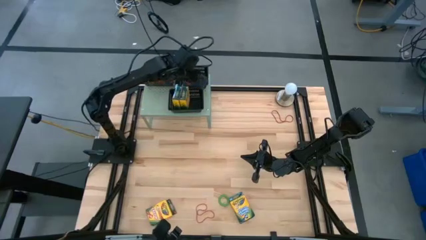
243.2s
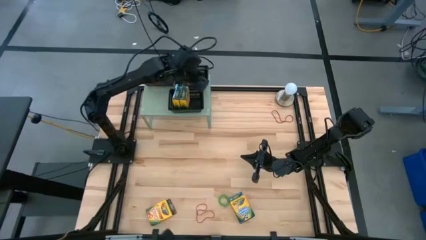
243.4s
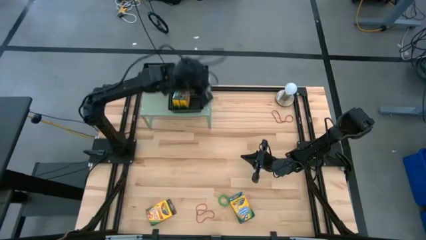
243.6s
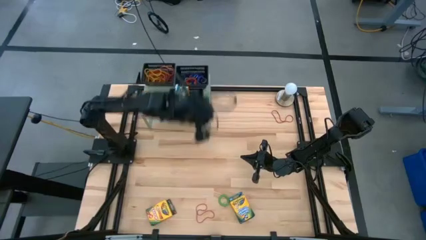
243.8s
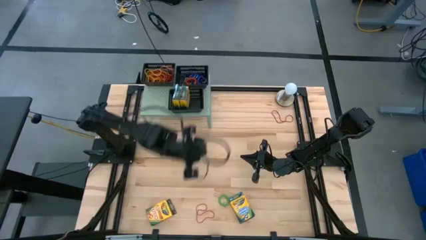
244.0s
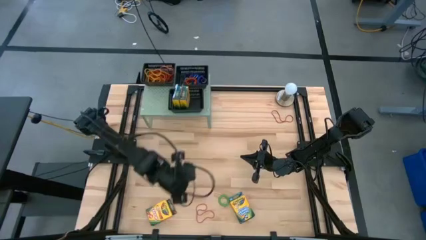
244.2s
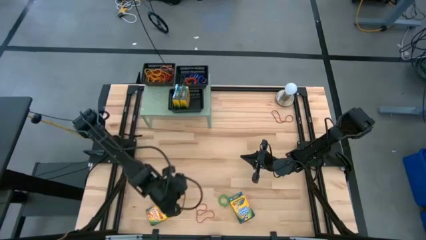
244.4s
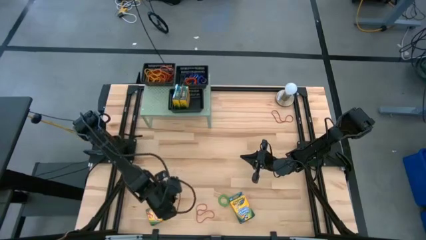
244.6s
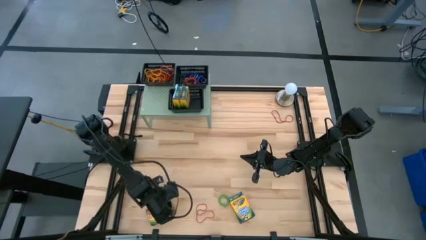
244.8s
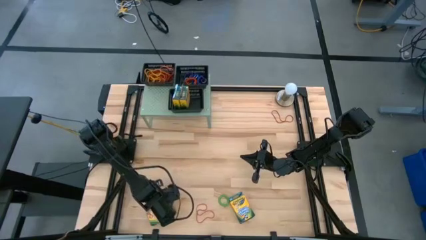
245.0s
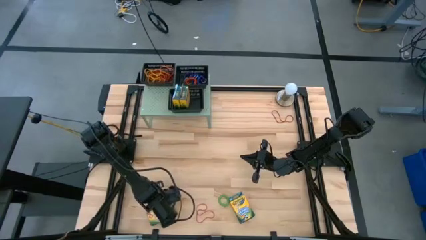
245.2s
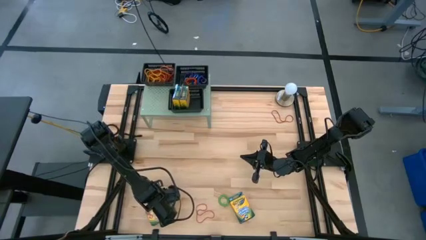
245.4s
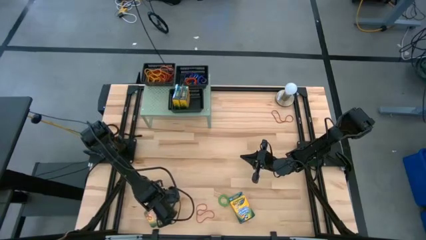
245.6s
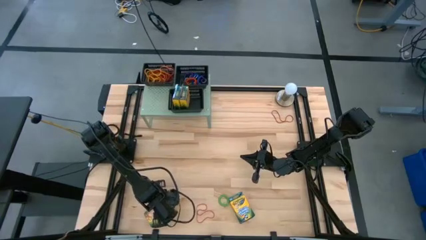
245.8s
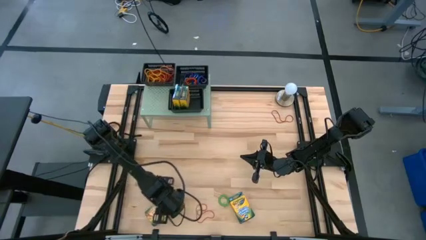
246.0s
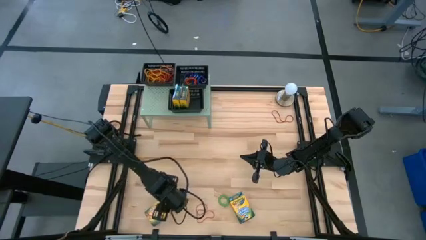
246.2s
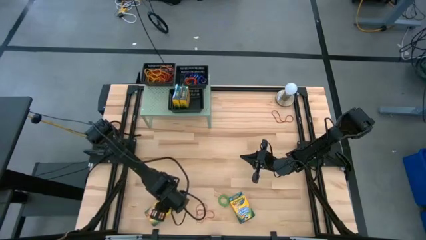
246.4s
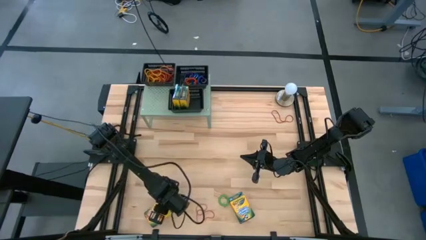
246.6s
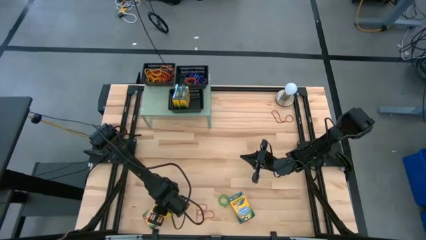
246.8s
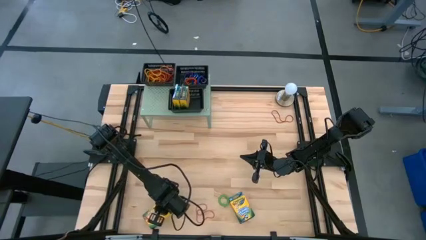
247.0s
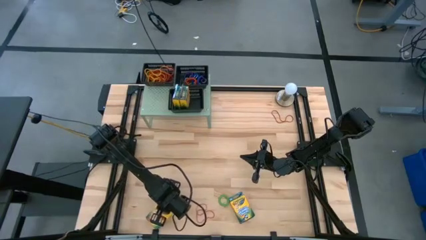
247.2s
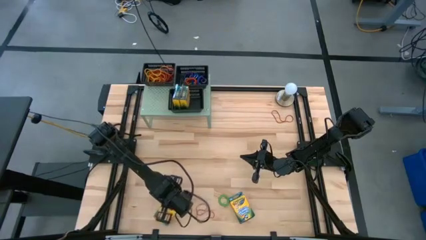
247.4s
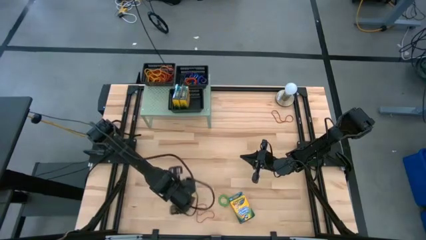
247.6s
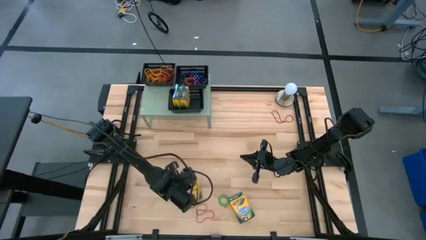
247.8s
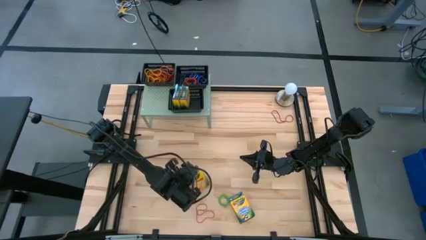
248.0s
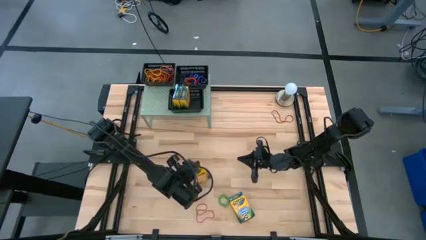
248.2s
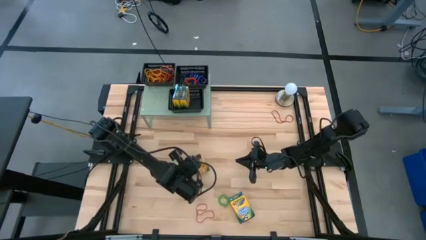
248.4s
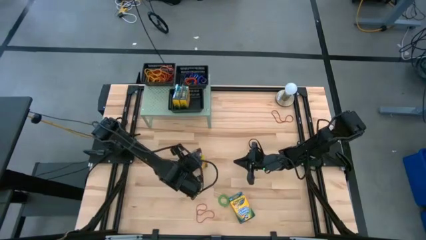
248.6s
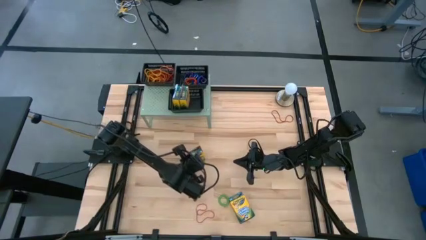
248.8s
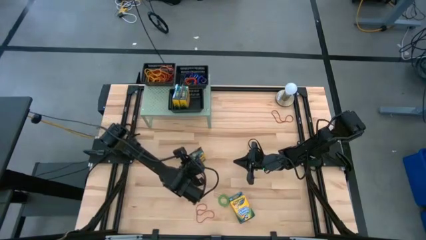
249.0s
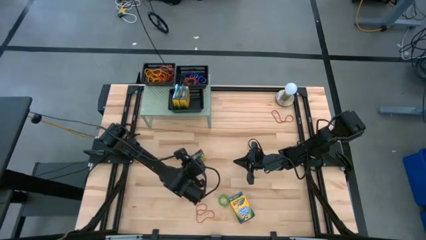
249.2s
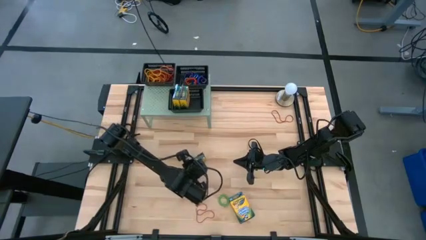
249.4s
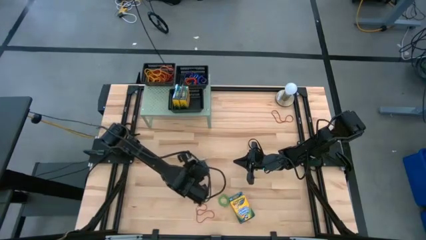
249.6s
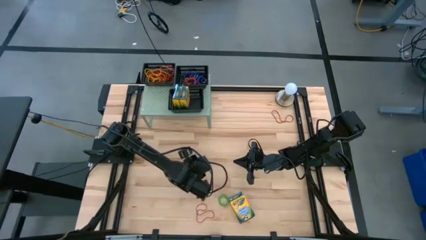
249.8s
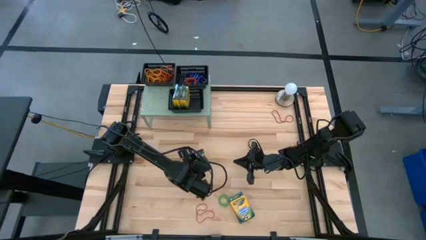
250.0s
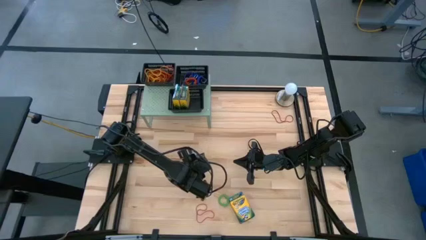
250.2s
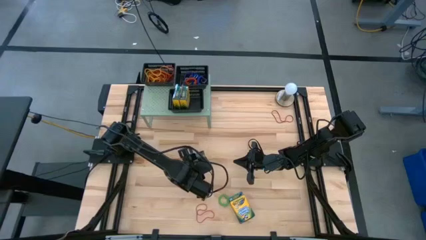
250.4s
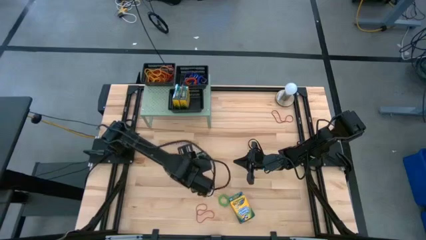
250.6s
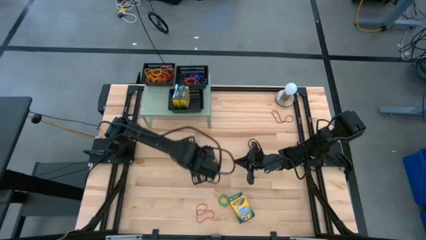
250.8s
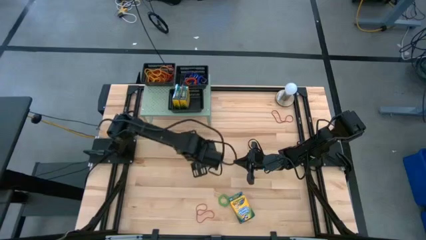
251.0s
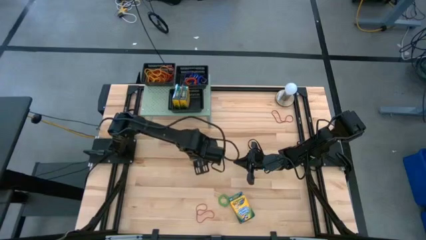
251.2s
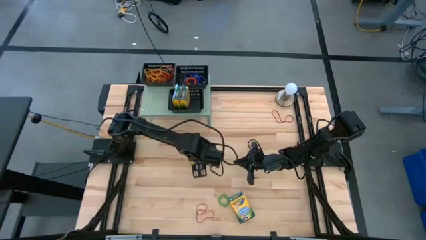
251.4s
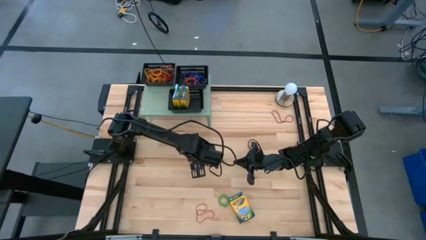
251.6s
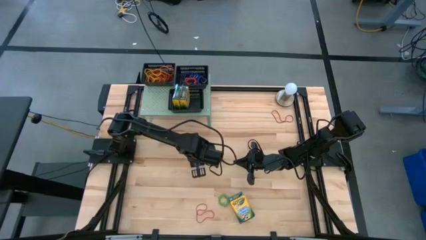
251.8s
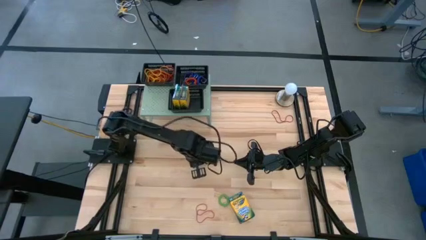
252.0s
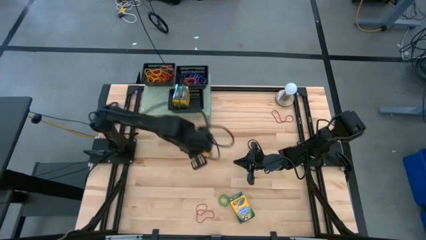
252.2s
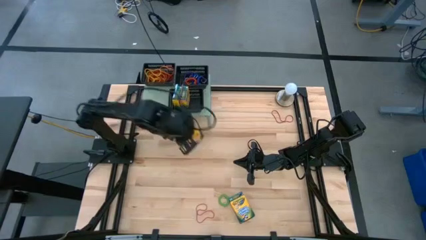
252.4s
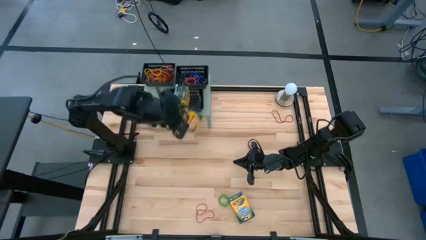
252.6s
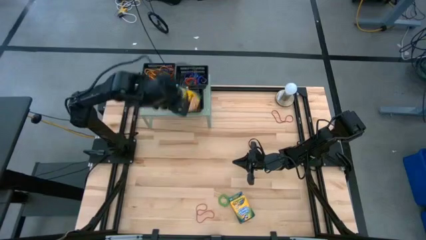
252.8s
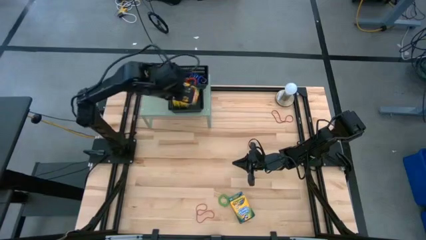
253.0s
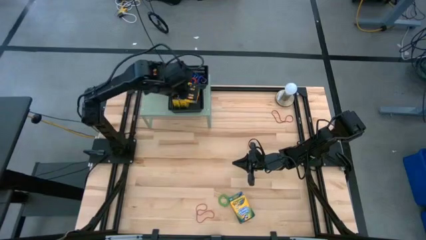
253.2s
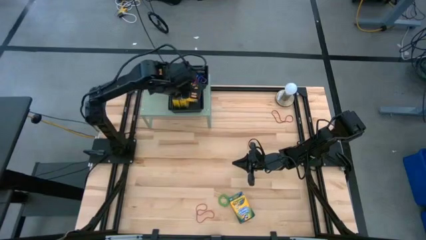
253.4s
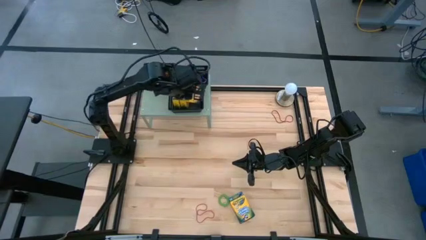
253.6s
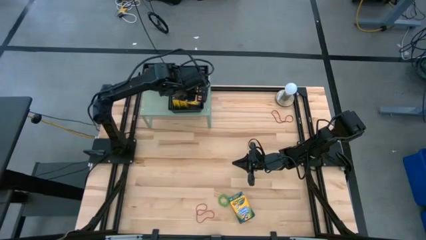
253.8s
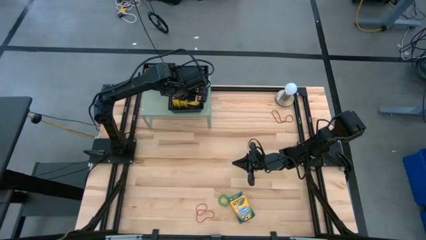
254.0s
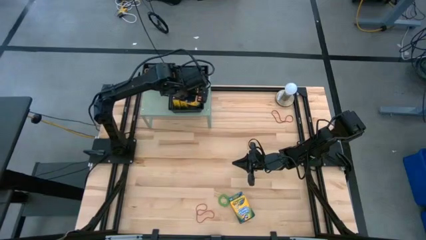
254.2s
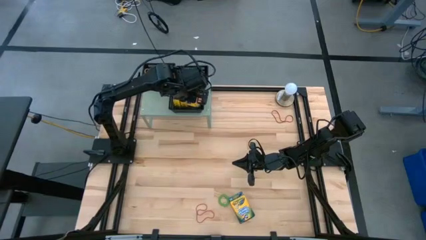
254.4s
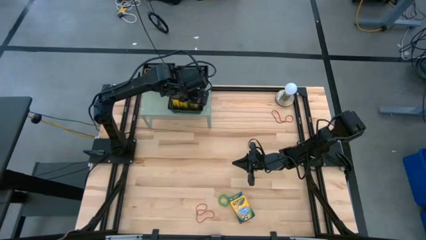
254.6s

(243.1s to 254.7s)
Task: Pick & Place Office Desk Supplies
Put the crayon box into the bottom black bin on the shelf

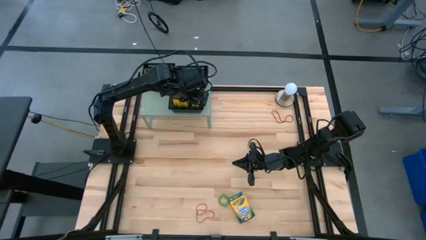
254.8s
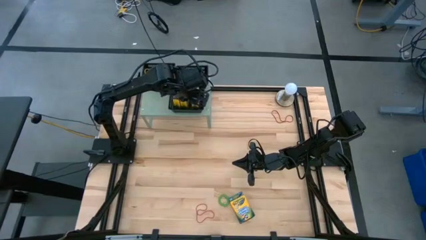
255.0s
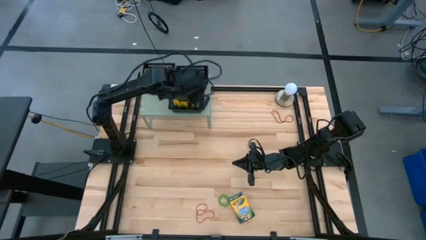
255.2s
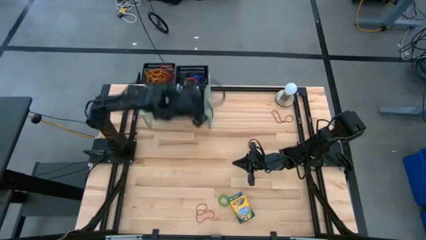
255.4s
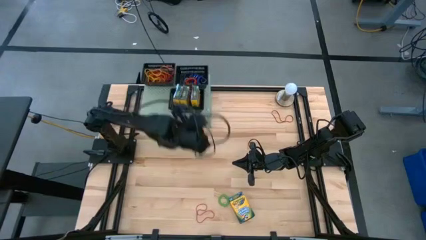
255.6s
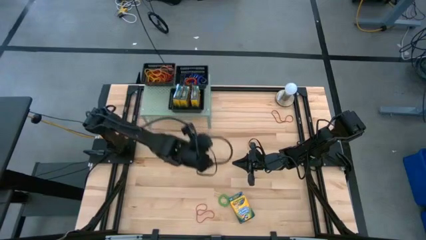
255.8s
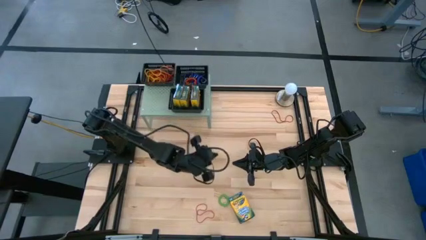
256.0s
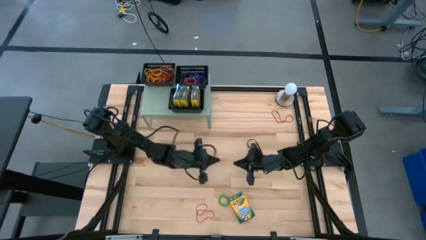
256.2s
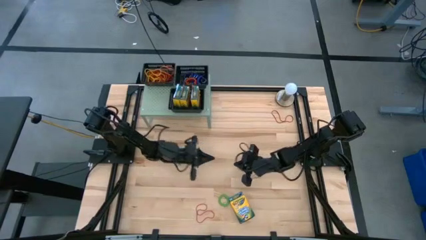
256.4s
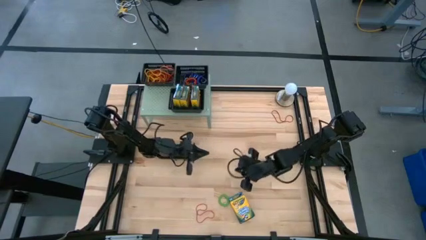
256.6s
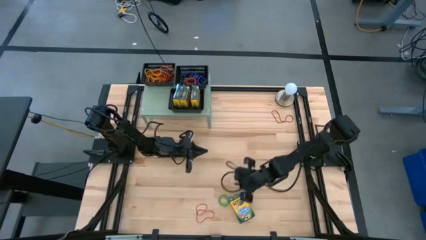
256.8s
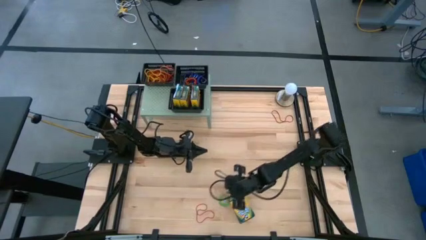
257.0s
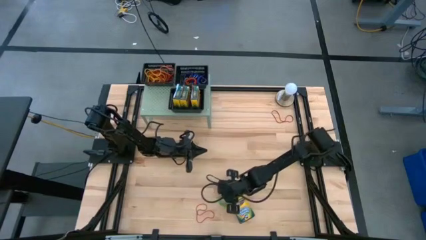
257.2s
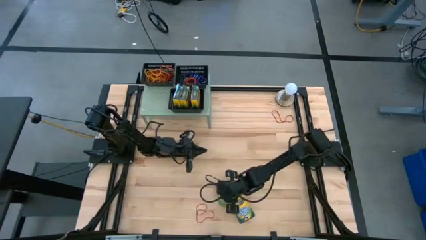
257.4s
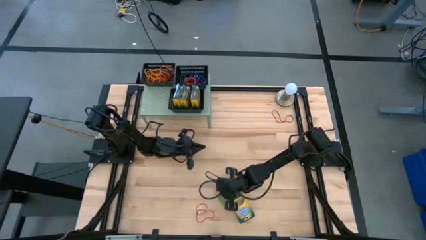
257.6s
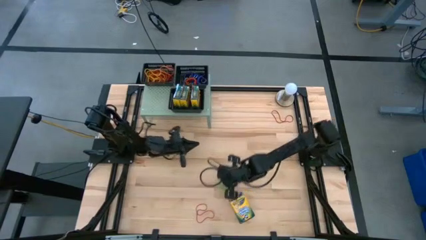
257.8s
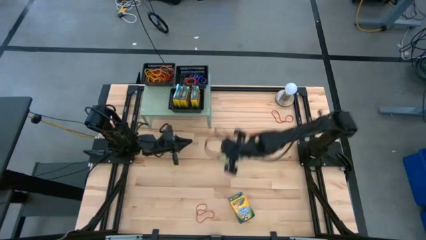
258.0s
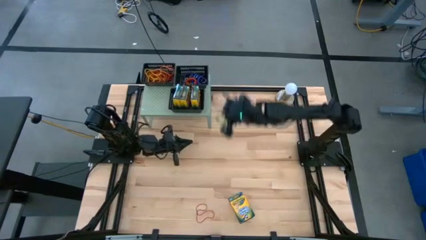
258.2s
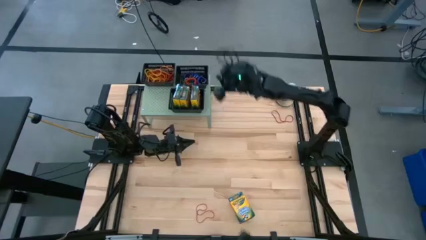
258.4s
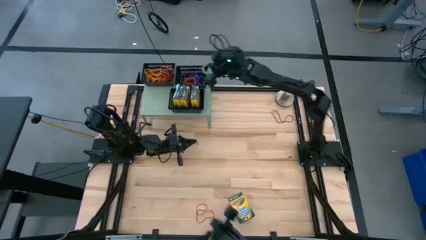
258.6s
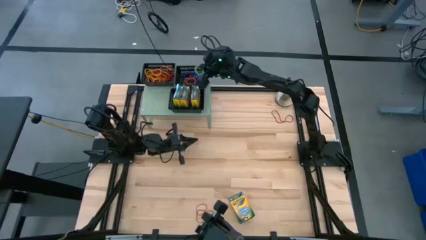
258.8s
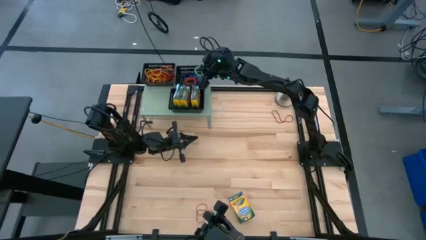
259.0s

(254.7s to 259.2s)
Put the green spring keychain into the top right black bin on the shelf
